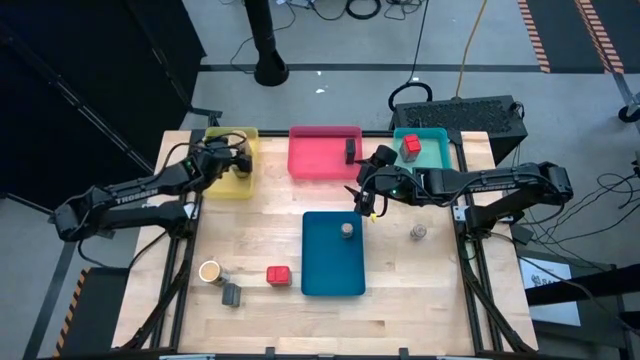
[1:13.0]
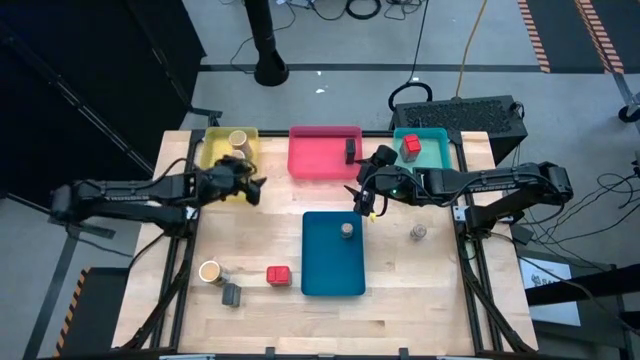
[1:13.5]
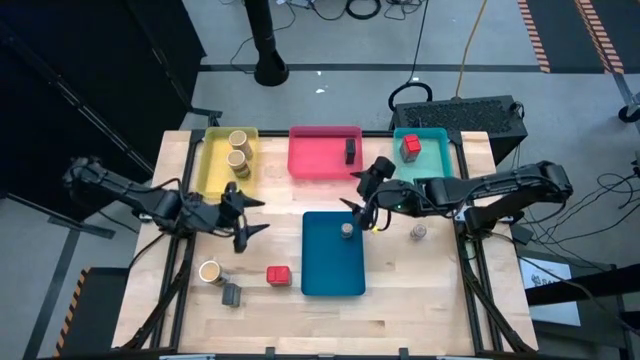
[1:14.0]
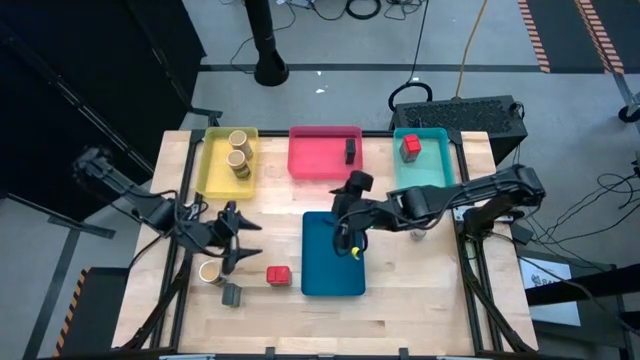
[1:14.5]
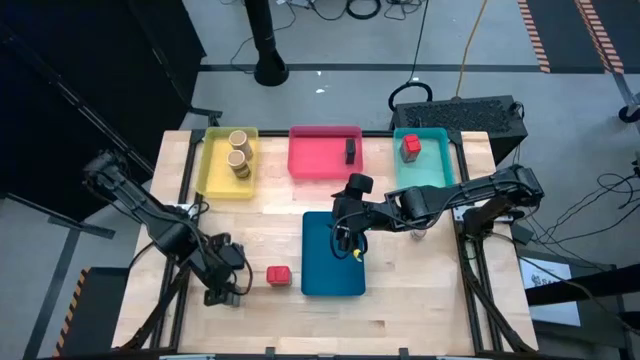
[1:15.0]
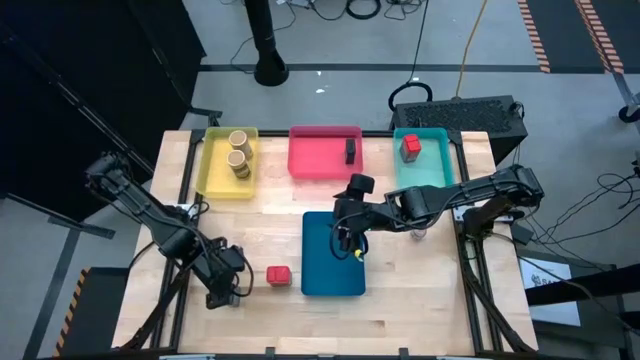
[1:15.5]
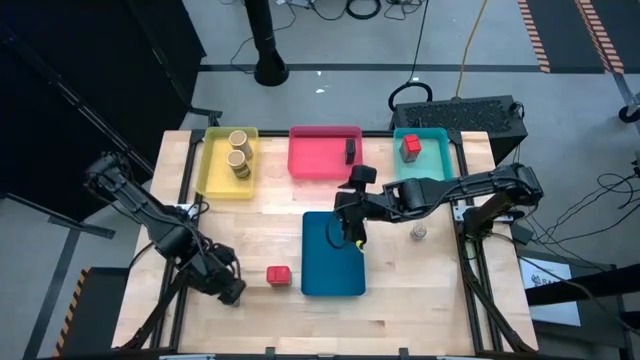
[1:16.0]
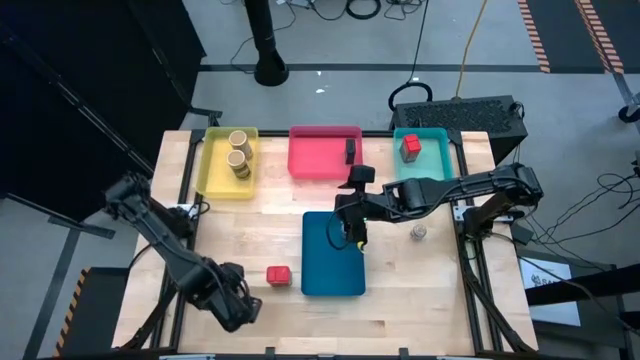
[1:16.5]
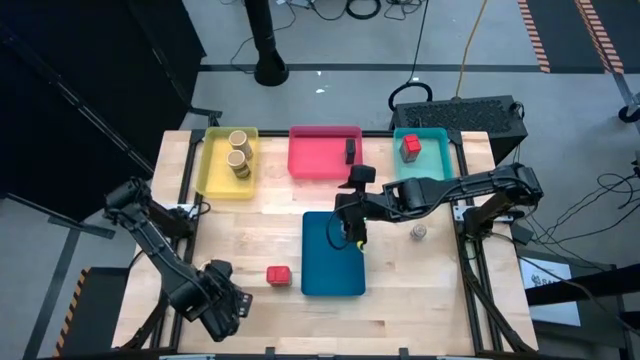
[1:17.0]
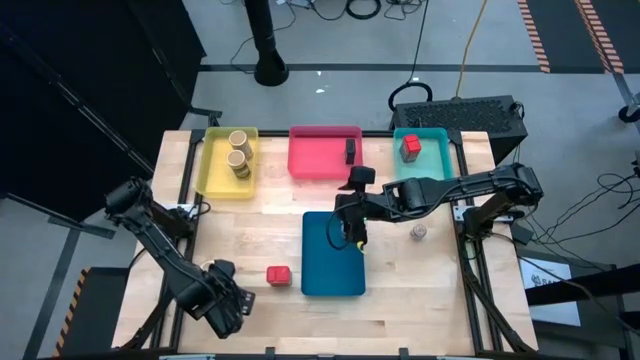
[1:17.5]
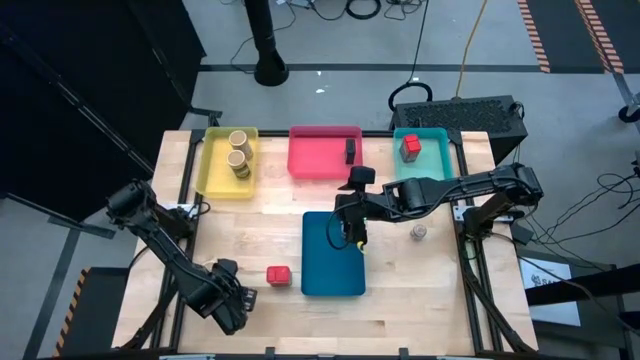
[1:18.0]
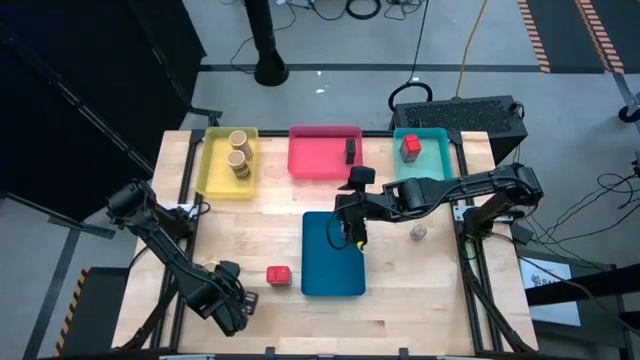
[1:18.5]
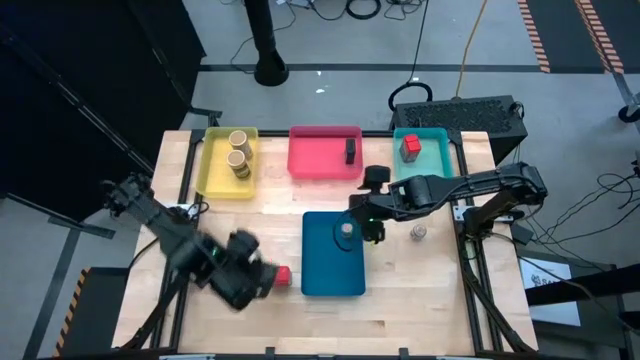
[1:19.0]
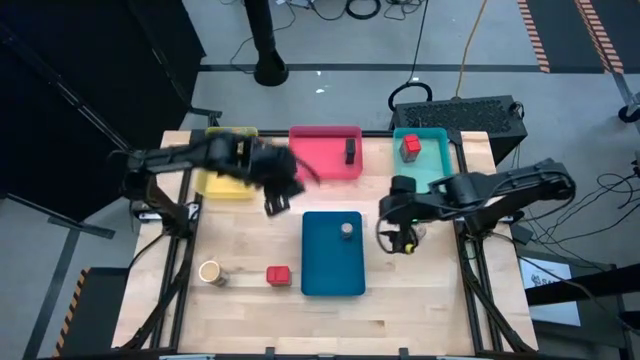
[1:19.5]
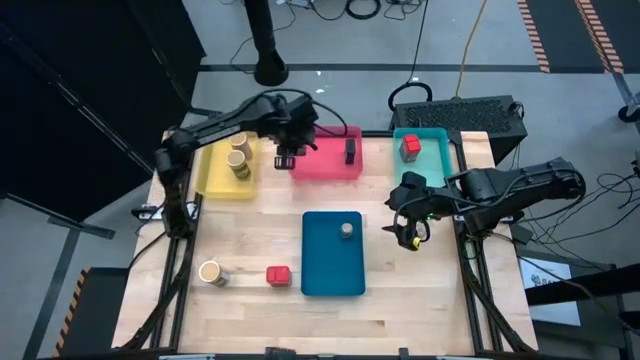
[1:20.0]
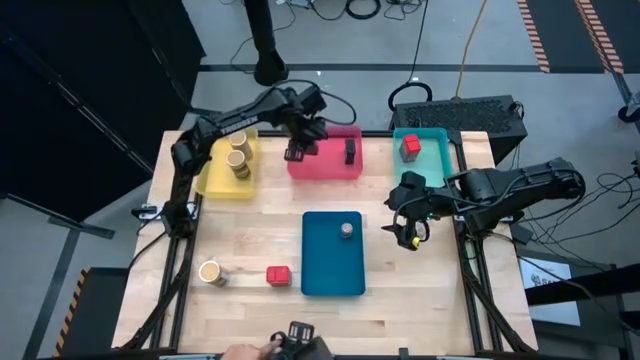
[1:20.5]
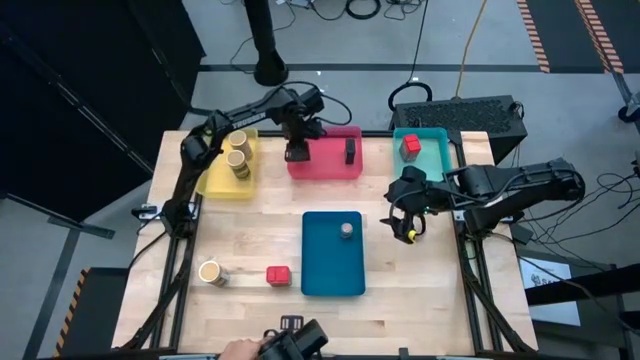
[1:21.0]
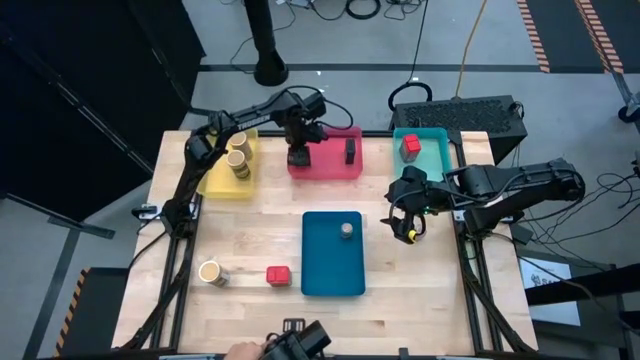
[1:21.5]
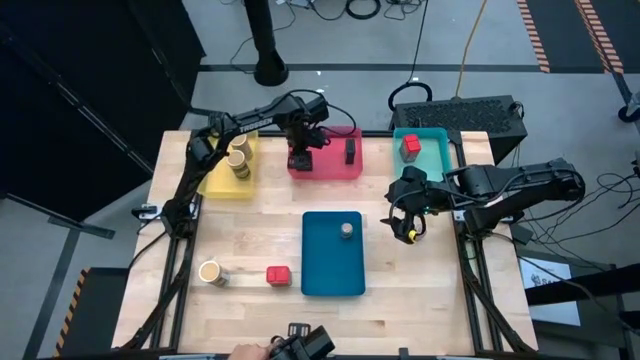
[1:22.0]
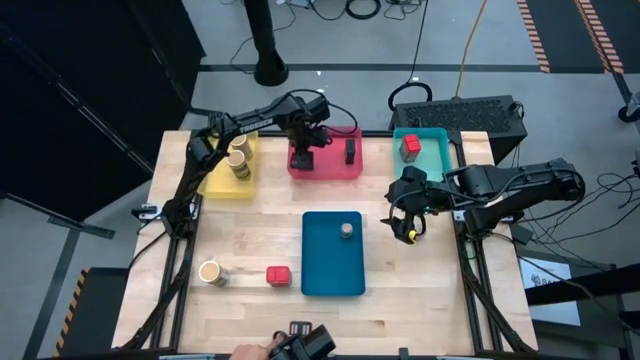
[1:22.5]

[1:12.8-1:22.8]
Task: Sort spices by type
Put the black seasoning can into the red bin

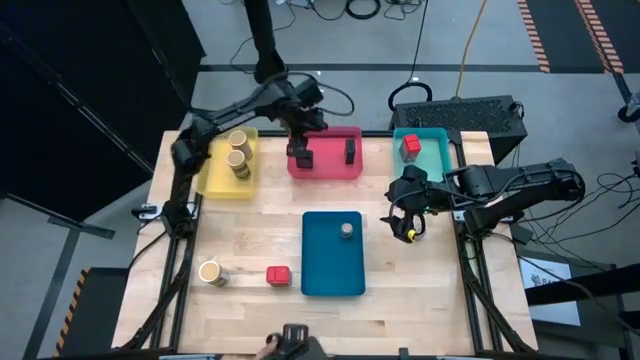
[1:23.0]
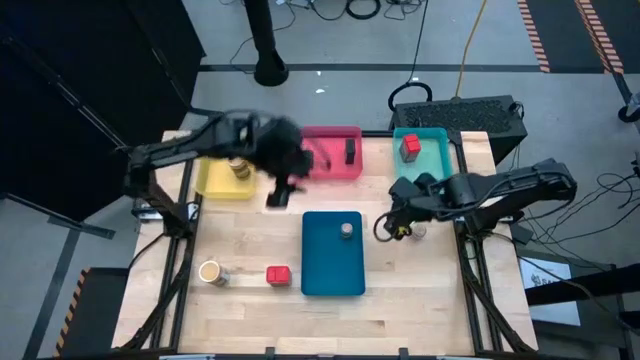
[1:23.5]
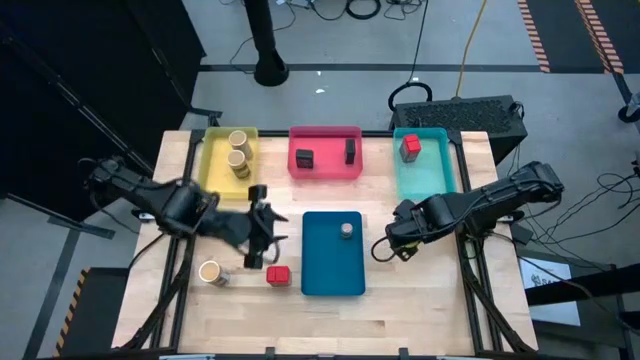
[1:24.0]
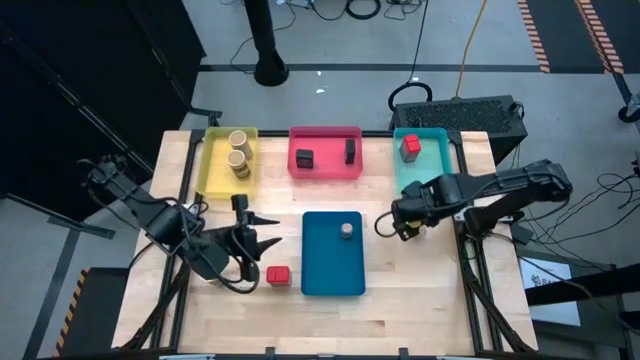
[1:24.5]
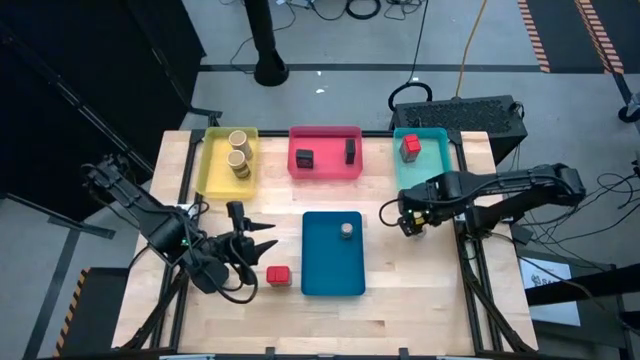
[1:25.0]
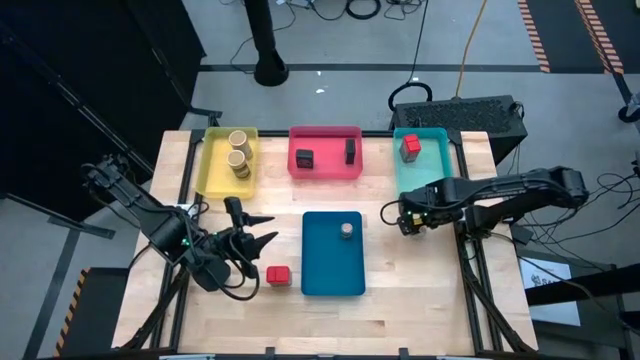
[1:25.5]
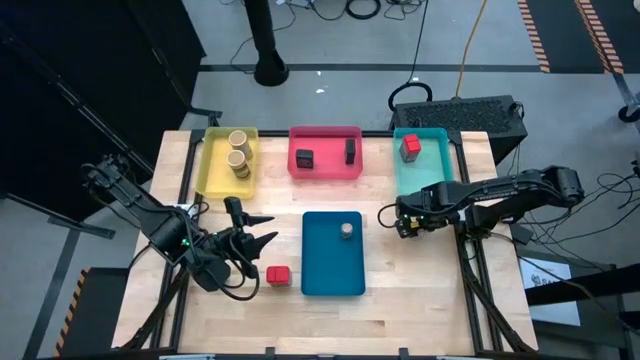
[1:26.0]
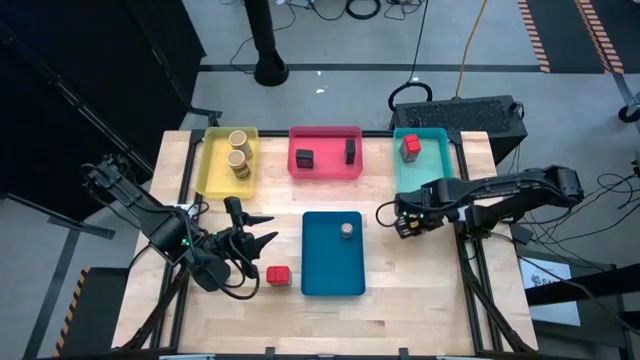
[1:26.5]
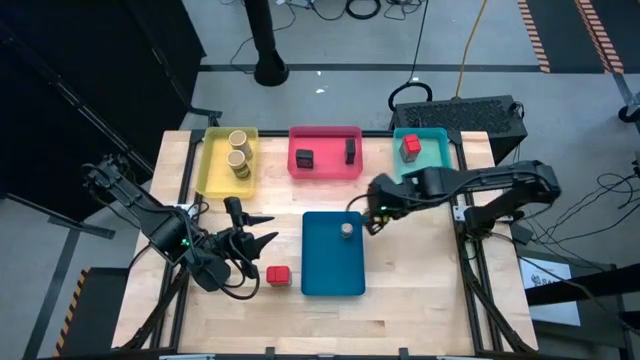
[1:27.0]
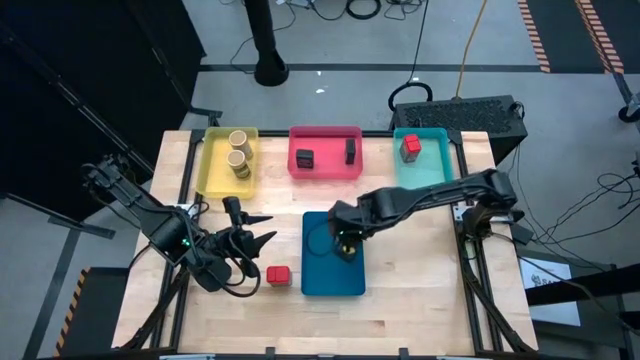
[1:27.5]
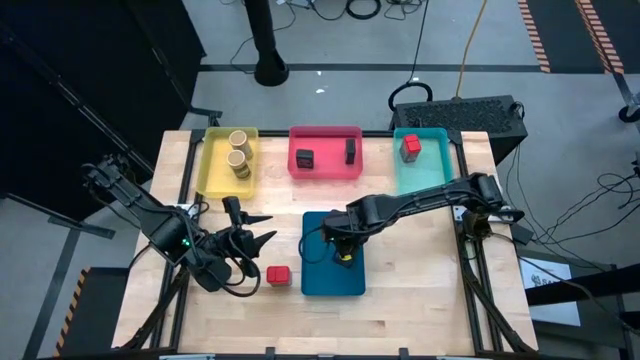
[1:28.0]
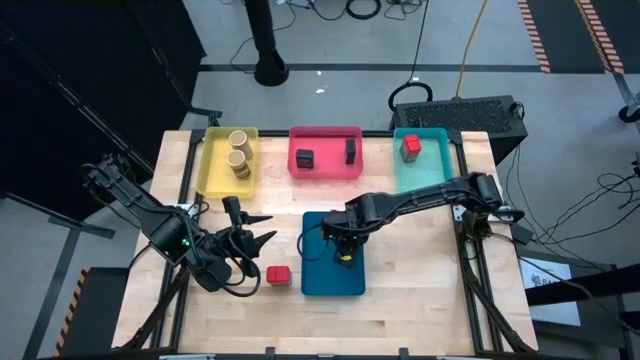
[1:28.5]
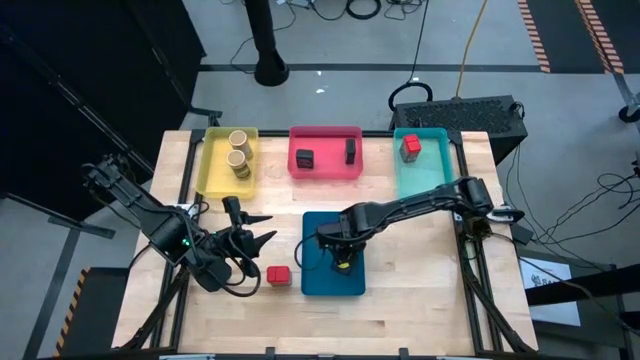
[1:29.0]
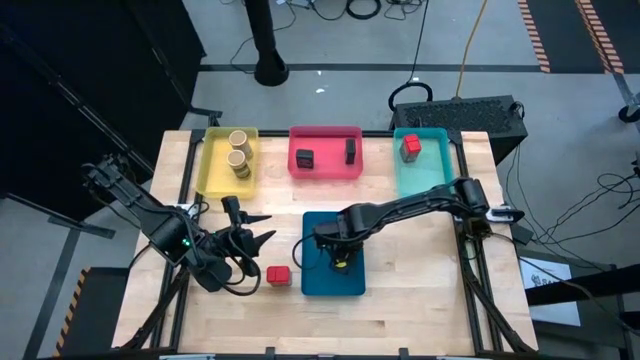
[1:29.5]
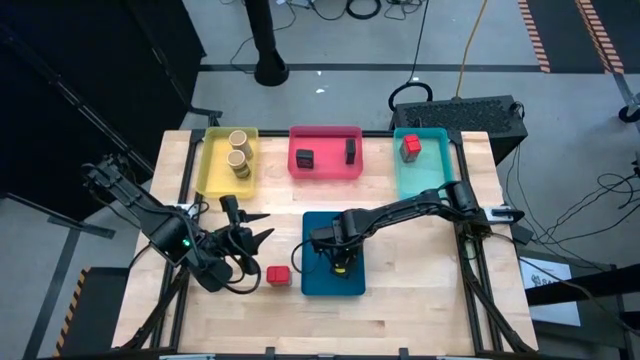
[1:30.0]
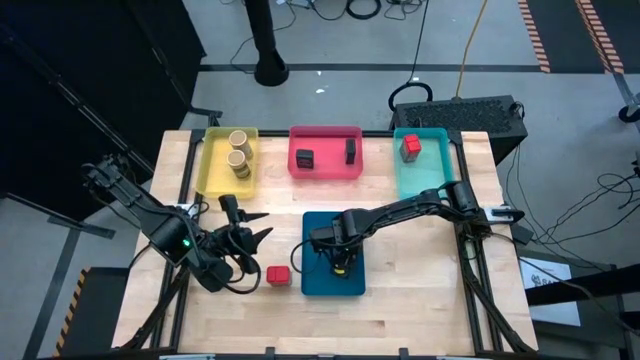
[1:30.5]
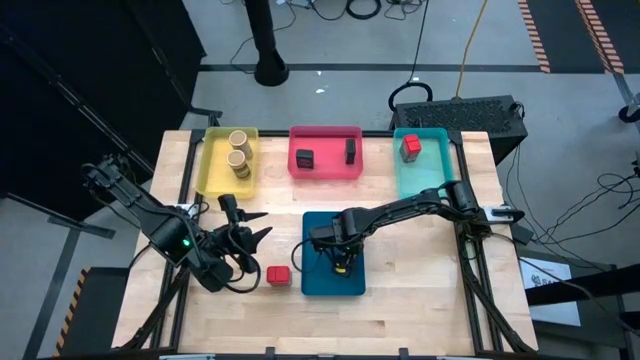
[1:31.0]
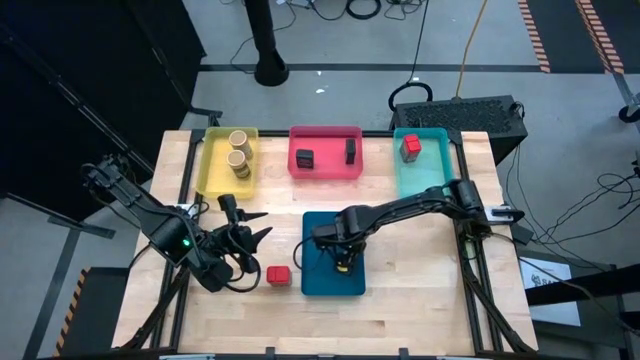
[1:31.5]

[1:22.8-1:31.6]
Put the brown seasoning bottle into the blue bin
